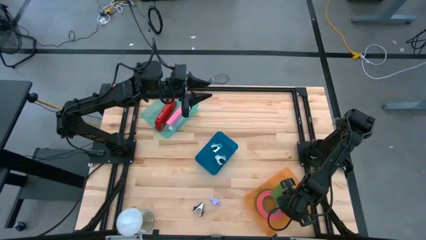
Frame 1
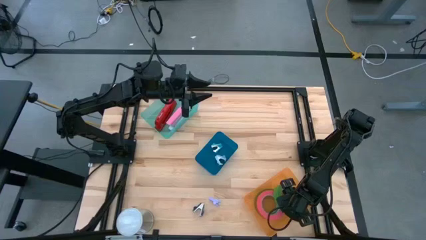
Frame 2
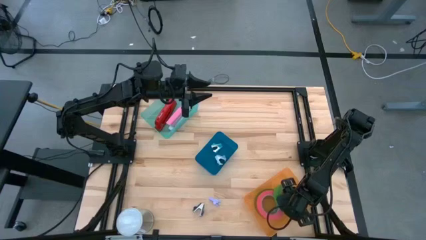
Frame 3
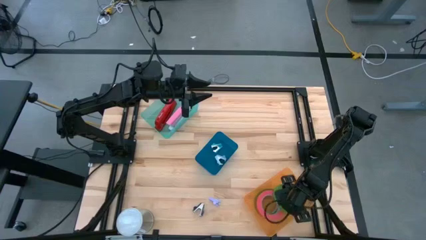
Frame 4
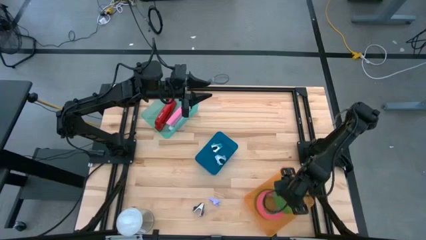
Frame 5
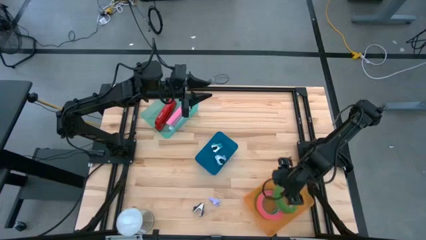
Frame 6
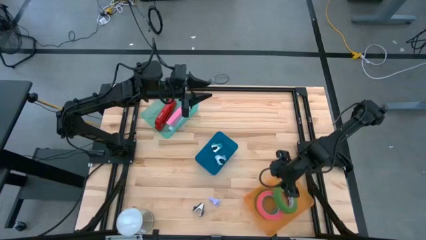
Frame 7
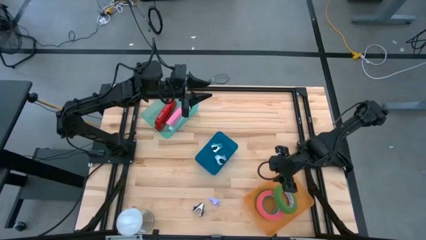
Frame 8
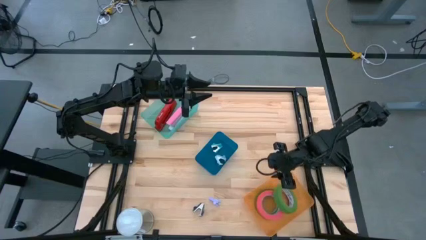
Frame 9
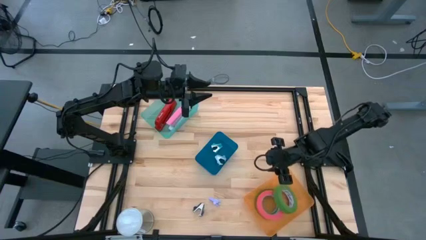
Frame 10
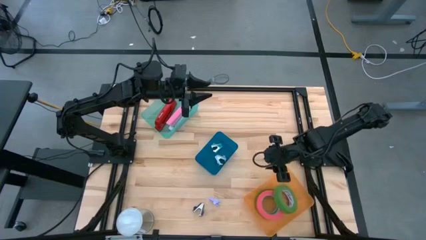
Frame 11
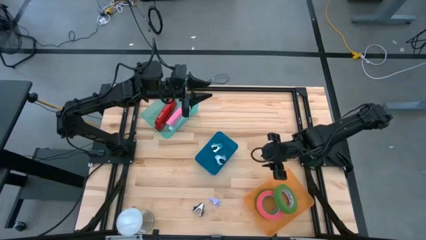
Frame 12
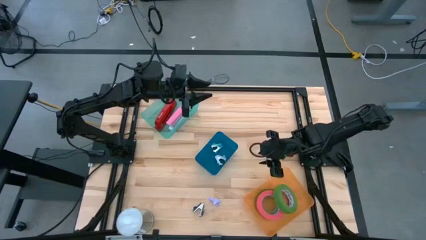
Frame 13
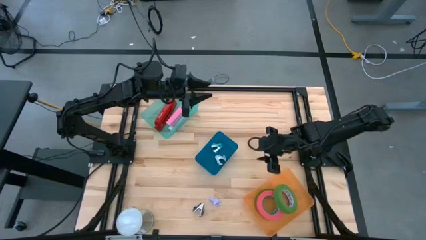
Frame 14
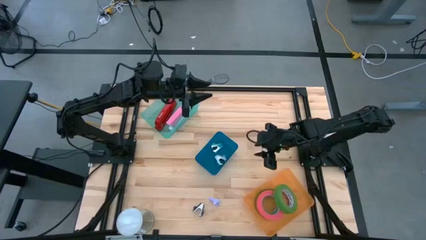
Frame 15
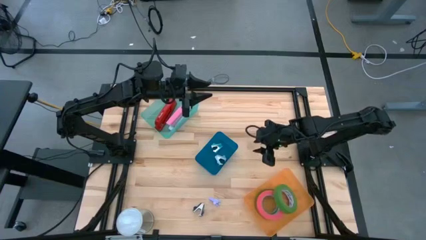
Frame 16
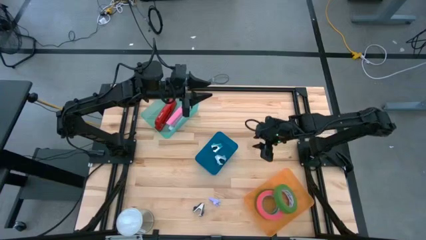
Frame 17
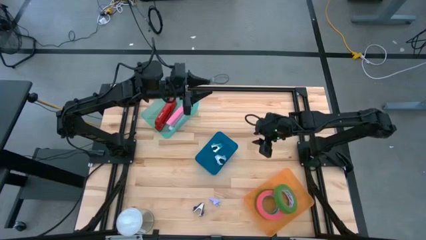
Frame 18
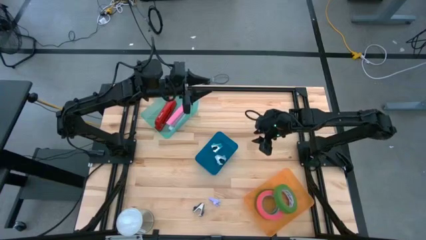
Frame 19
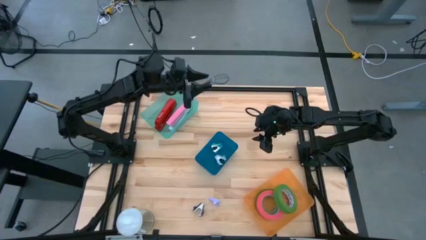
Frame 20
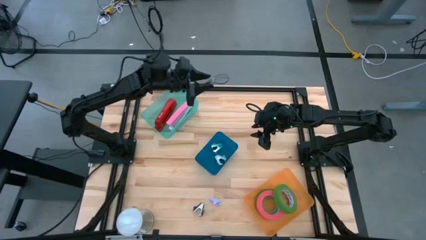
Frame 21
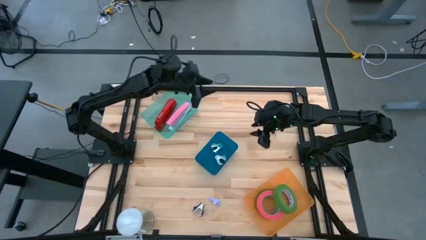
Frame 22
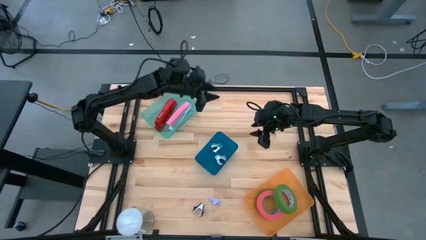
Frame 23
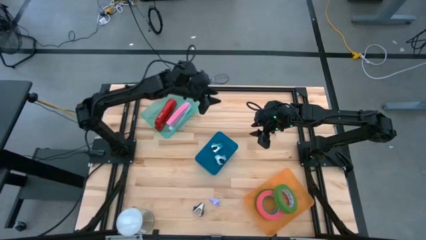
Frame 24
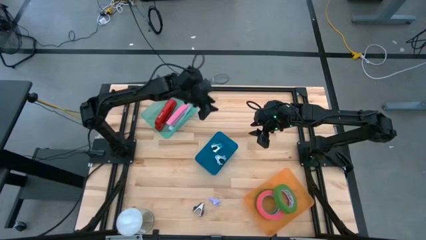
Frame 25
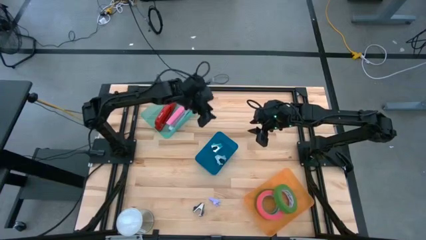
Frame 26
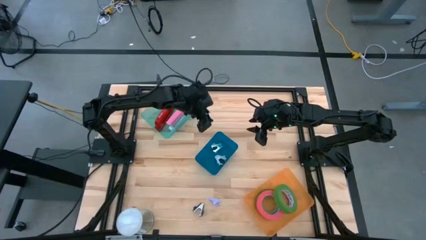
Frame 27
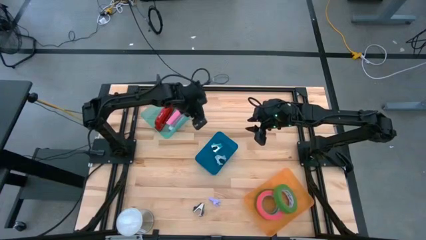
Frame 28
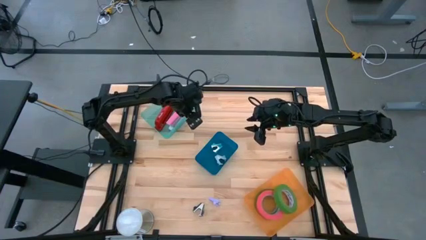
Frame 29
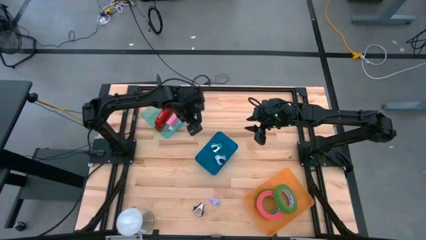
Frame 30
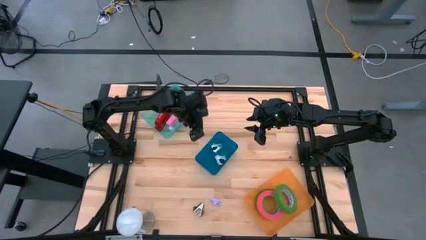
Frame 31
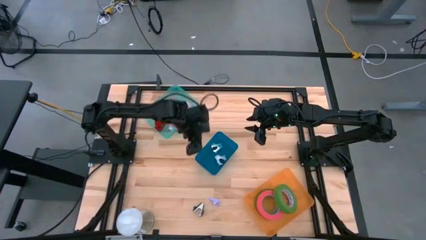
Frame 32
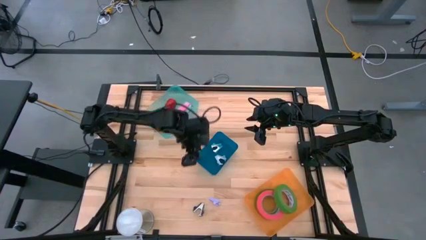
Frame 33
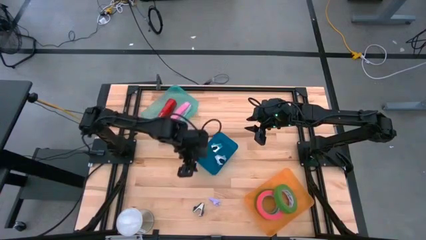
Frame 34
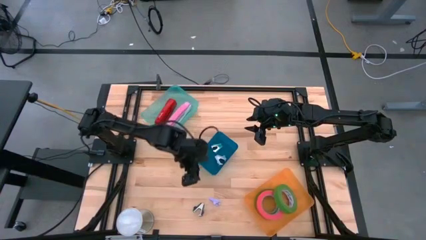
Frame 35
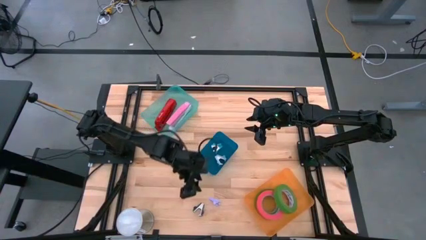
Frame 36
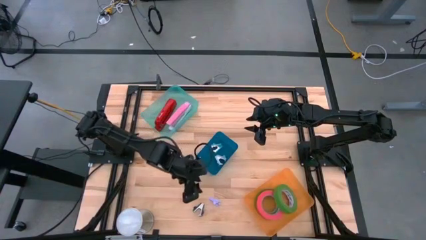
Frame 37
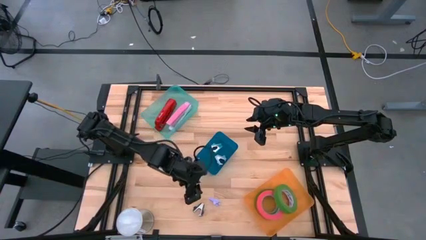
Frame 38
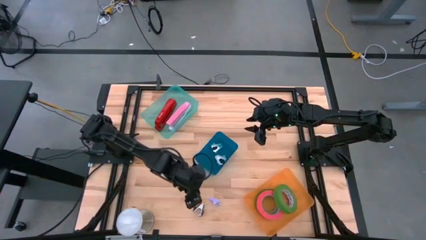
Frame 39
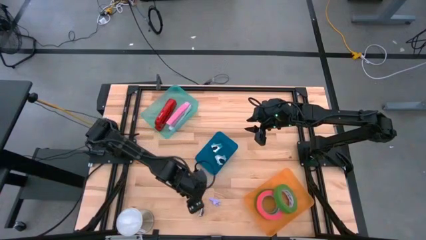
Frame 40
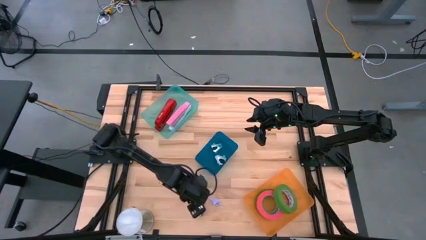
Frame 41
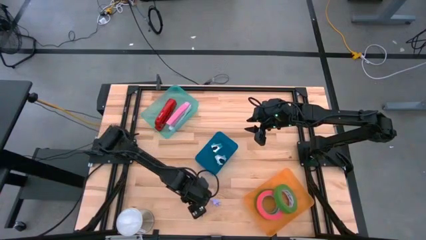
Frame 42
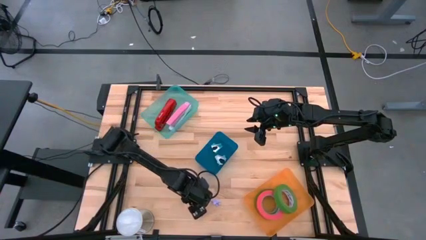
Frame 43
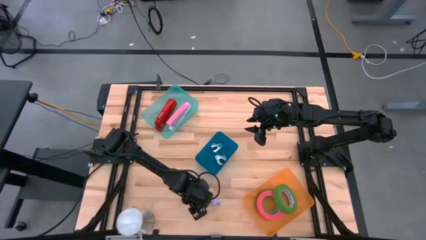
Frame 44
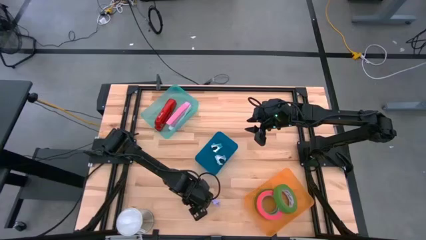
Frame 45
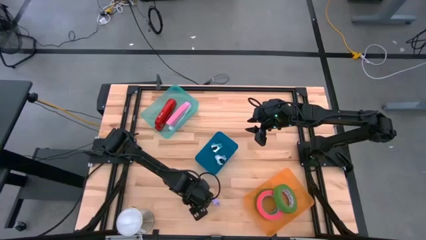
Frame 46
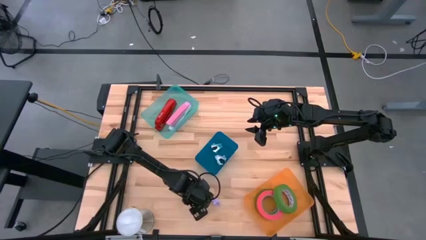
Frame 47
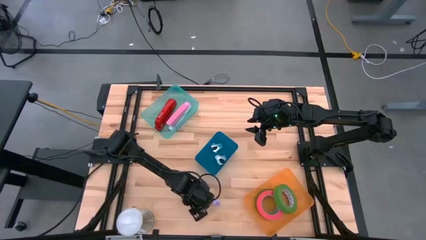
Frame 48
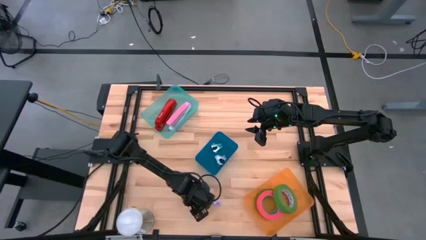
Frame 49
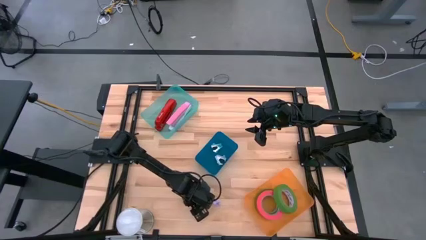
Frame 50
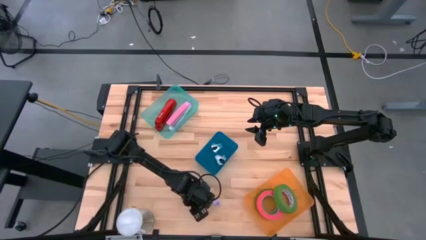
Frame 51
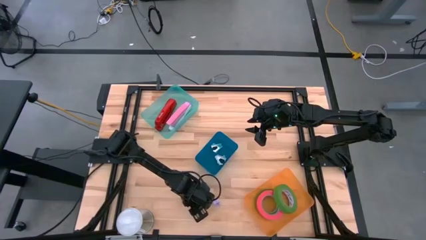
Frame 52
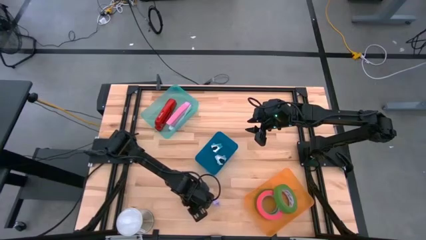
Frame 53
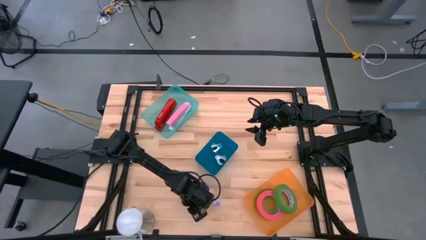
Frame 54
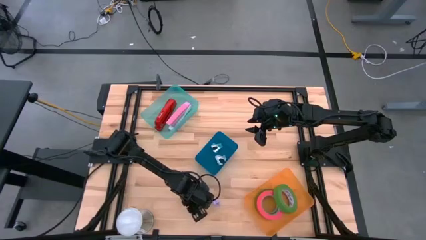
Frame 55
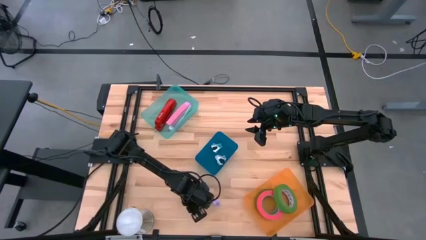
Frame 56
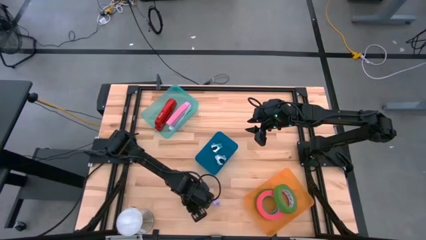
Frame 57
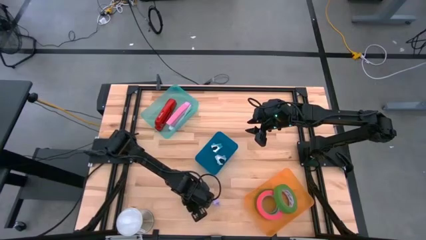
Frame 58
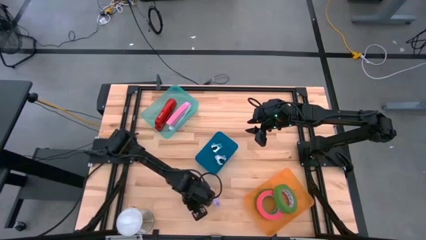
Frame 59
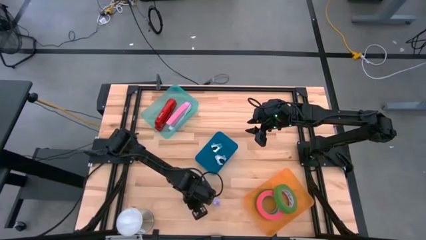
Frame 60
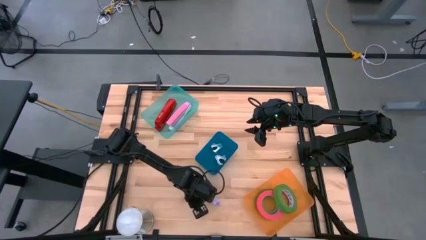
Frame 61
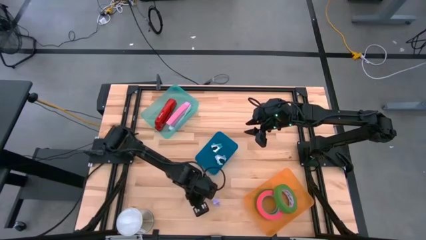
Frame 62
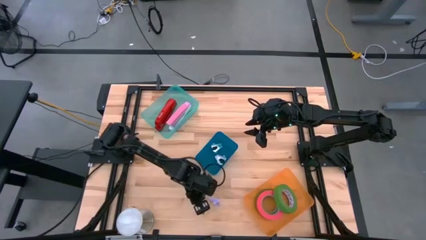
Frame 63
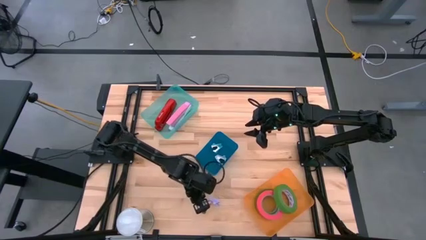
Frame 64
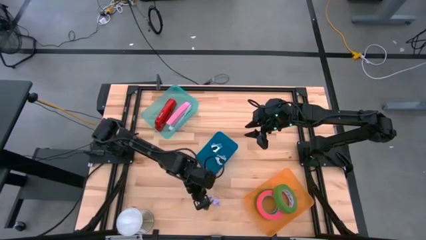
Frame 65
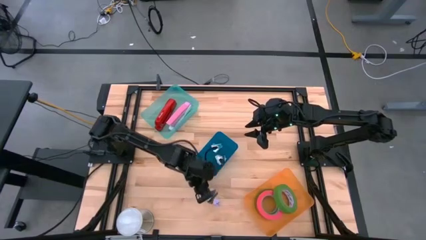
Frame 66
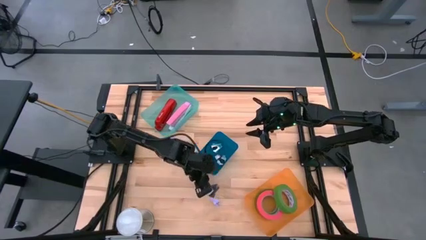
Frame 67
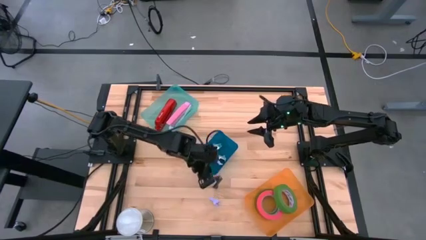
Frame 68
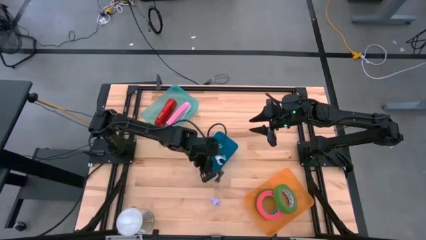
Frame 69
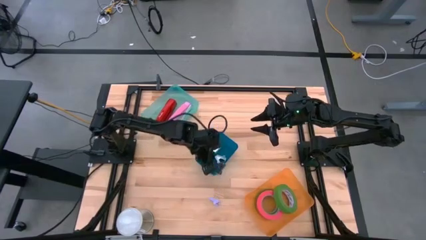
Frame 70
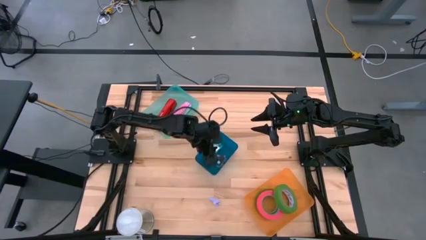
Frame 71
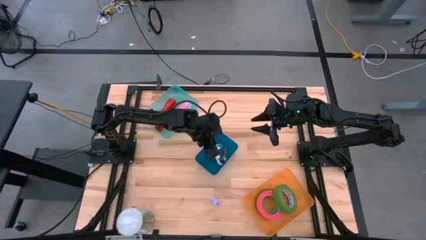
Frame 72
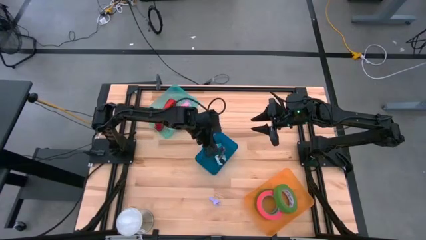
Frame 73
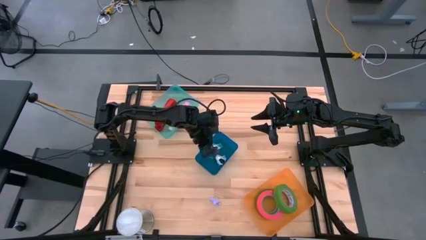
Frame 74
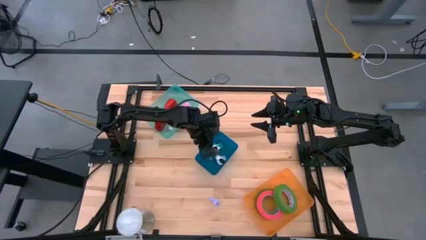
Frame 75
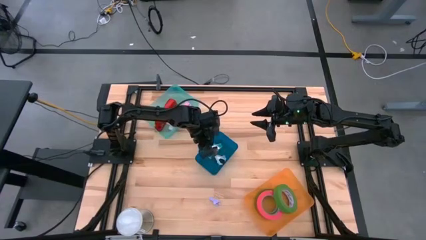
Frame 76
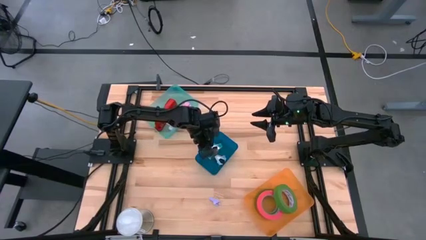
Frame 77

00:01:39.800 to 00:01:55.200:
Task: Pick and place Stapler, Stapler remover, tape
Put the black staple remover into the blue bin
